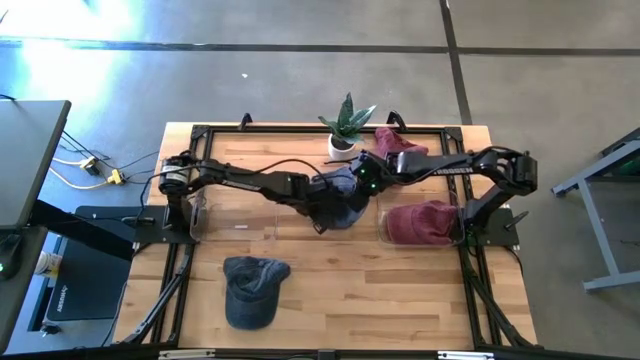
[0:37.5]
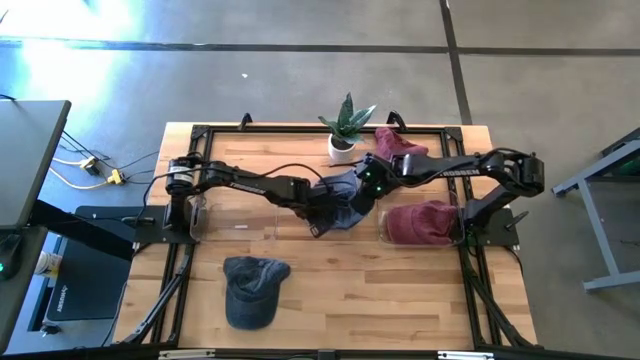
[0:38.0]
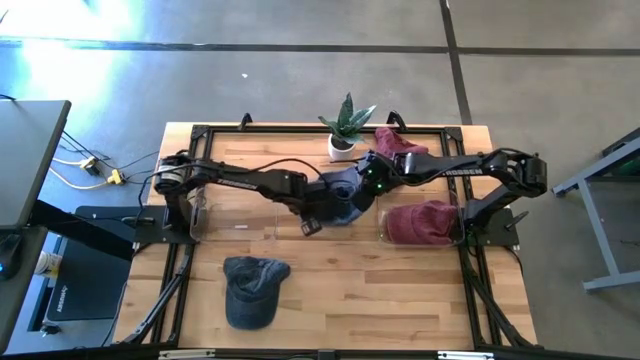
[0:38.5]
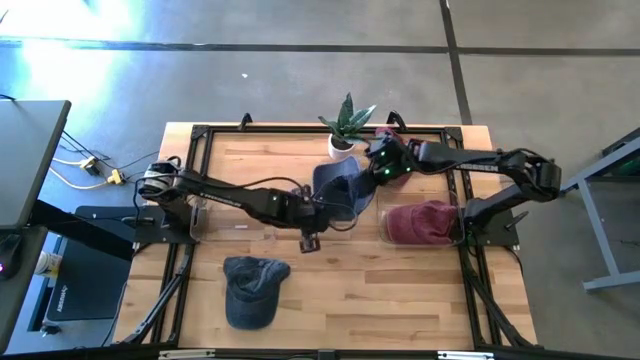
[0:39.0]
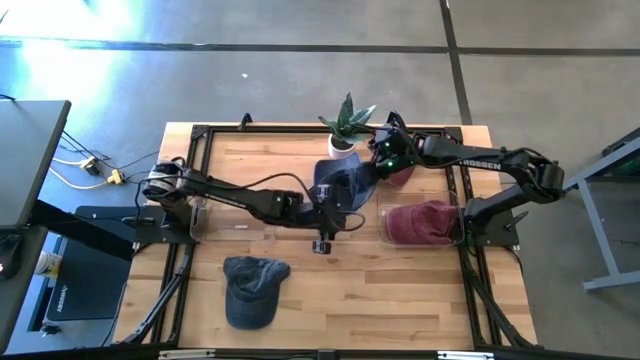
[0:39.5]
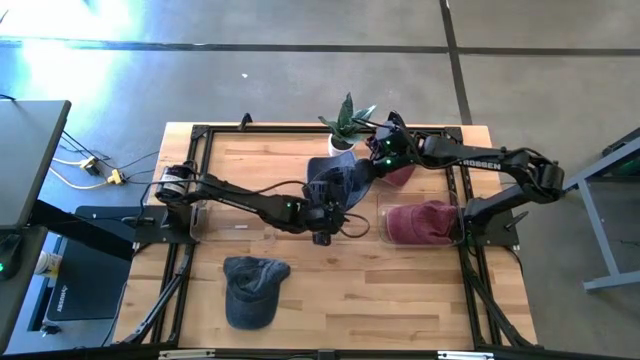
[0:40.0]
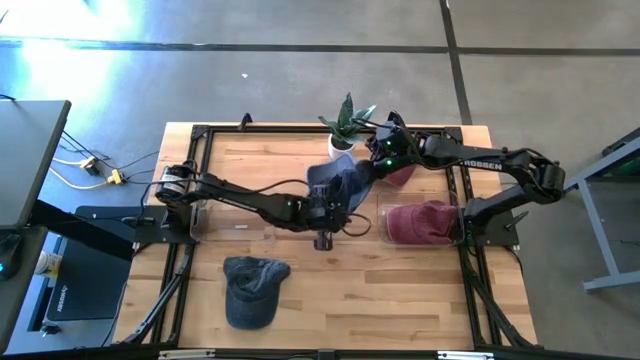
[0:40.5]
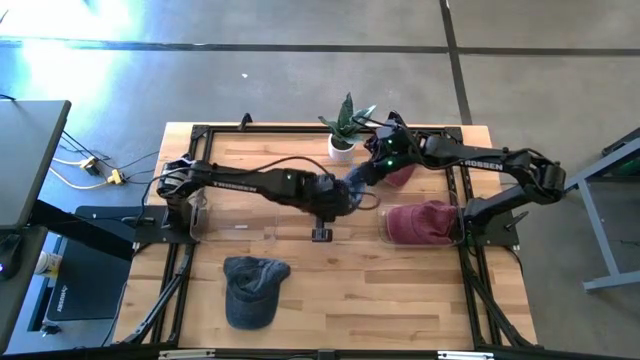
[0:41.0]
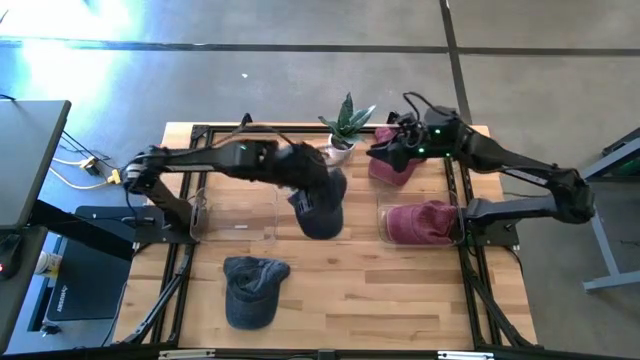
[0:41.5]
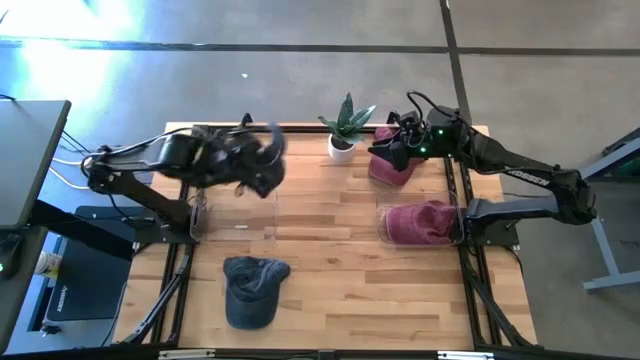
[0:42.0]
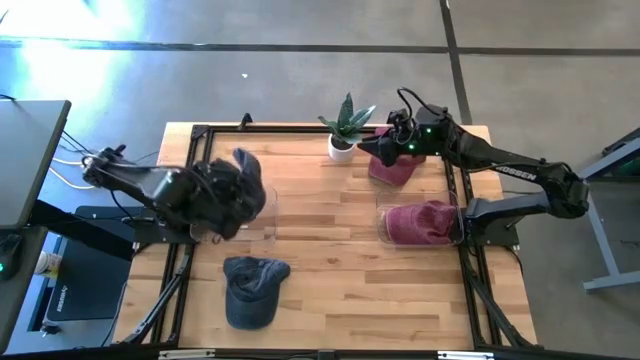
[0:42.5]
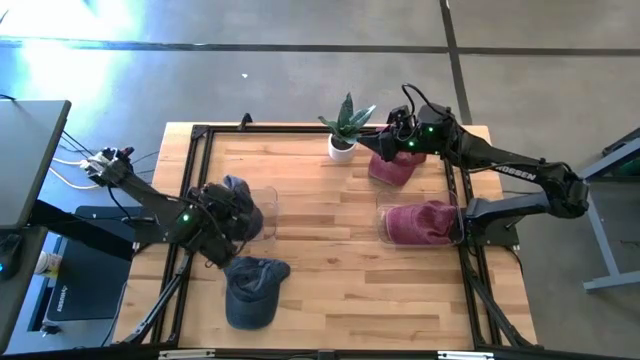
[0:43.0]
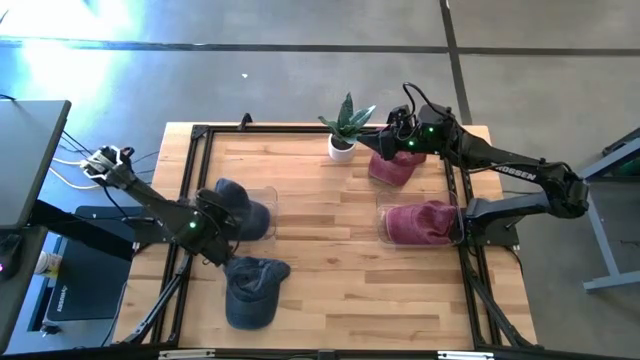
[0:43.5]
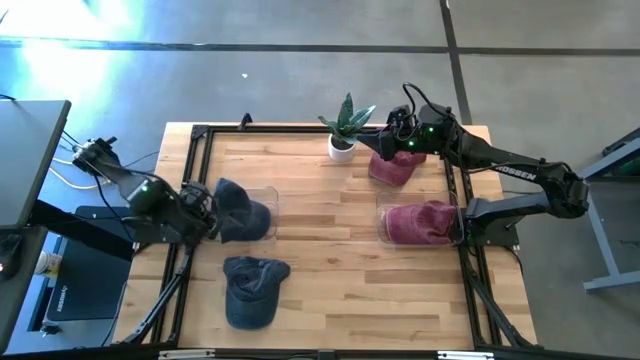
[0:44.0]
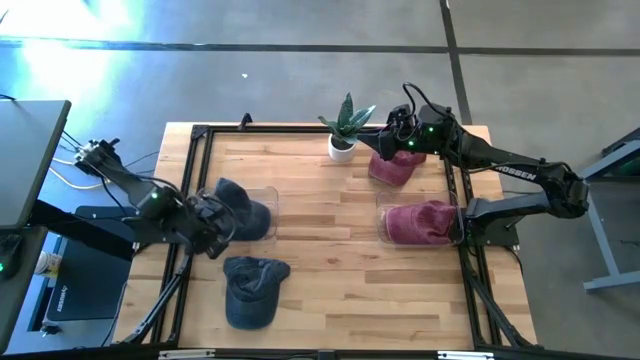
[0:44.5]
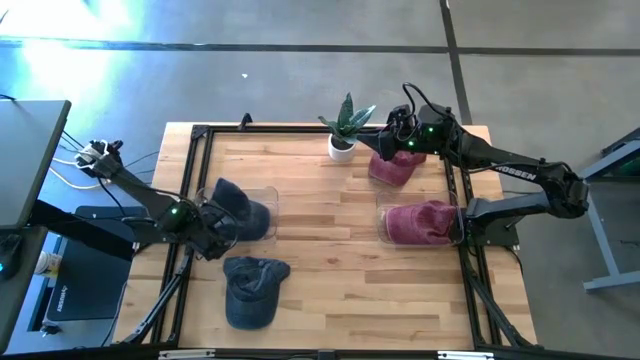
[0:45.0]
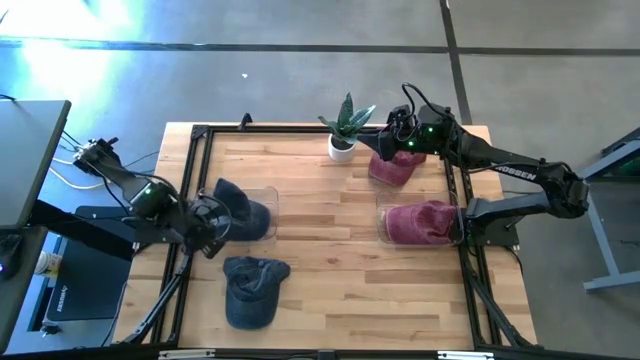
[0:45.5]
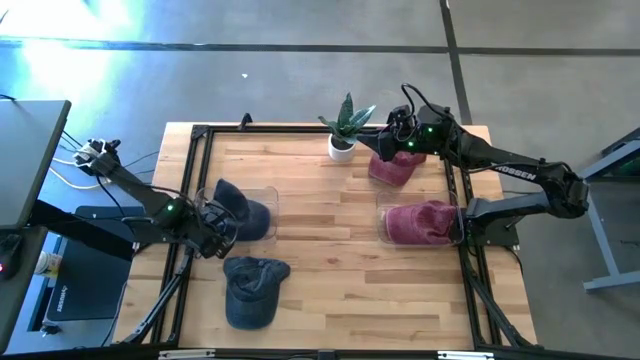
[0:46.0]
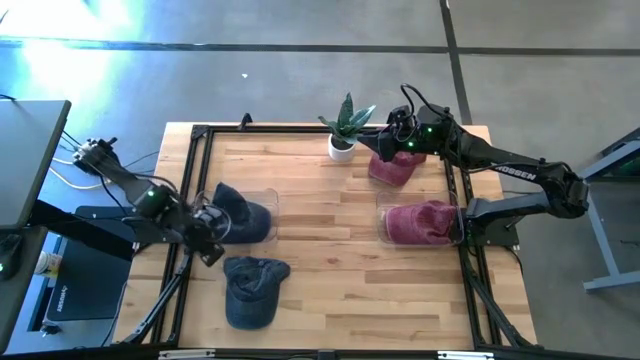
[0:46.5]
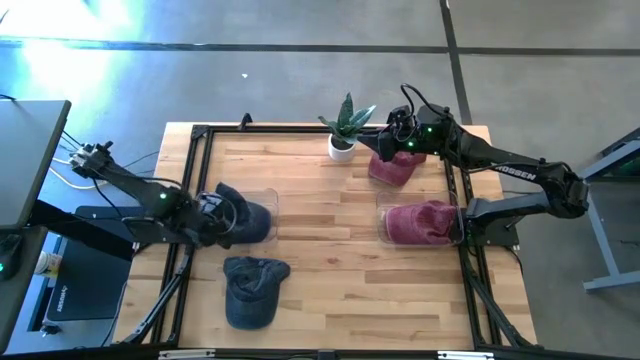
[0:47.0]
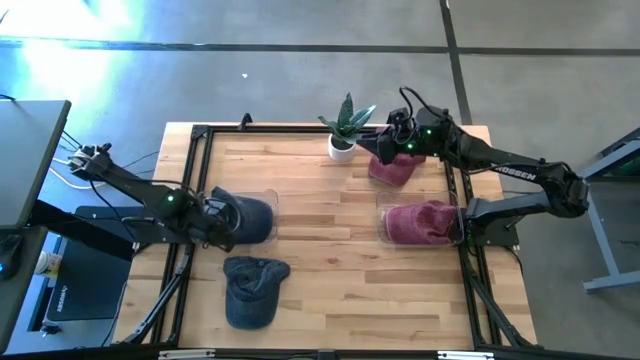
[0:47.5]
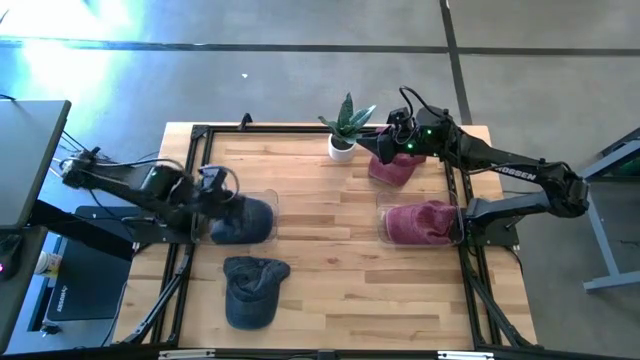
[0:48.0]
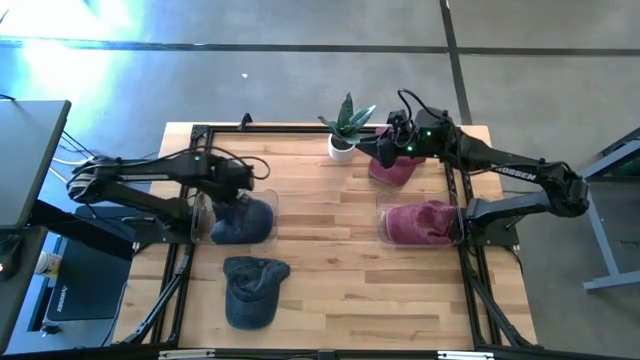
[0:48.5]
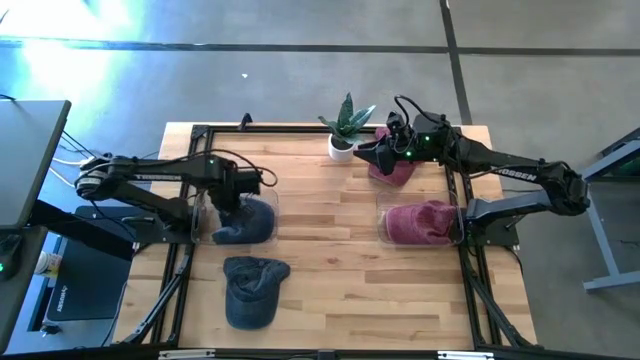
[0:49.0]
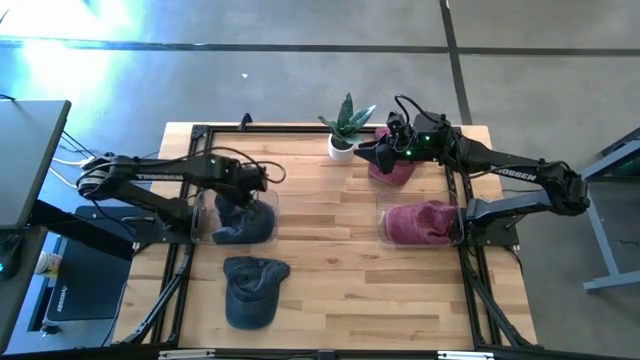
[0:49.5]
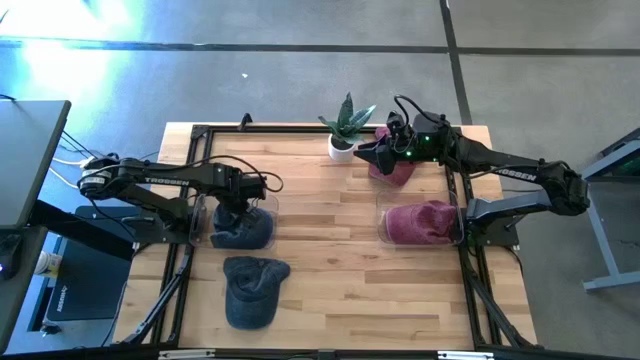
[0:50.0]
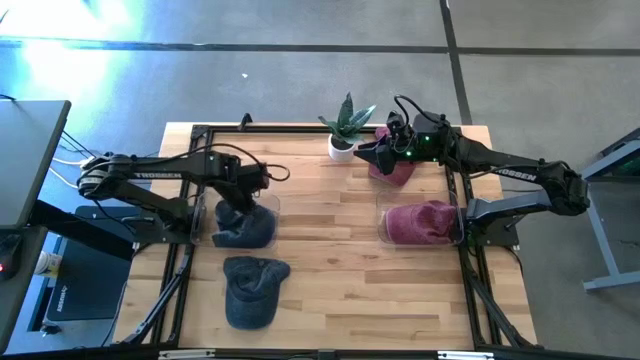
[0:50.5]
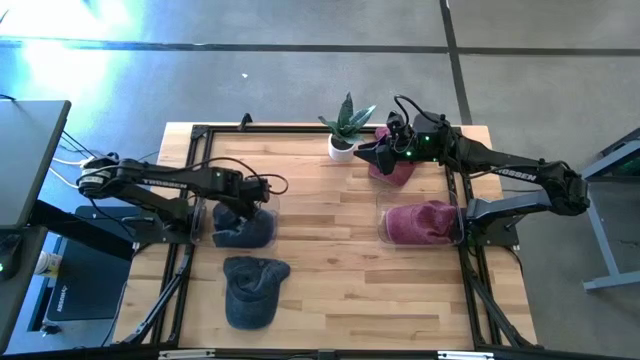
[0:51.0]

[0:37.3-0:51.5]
Task: Pick & Place hat
Put the top blue cap into the left transparent bin

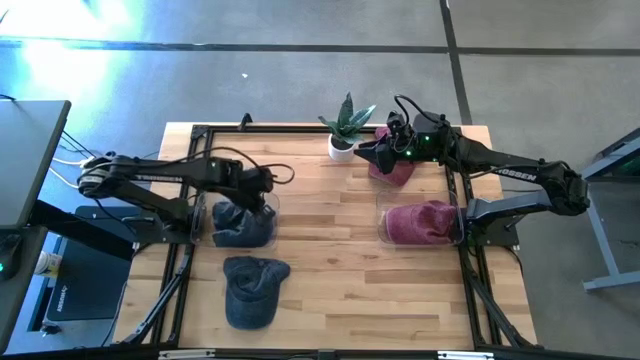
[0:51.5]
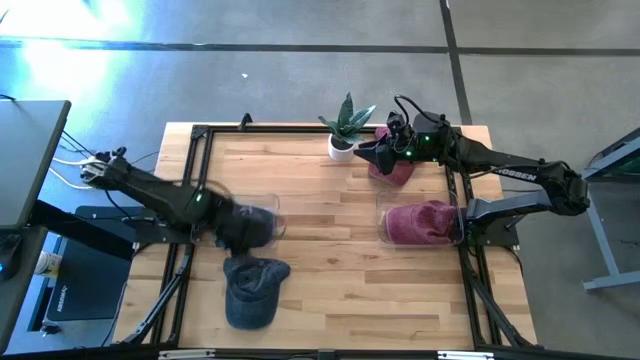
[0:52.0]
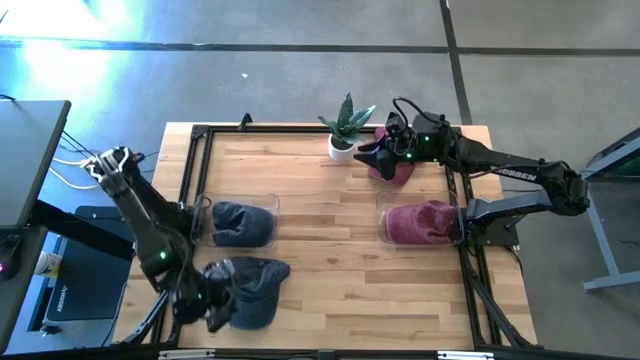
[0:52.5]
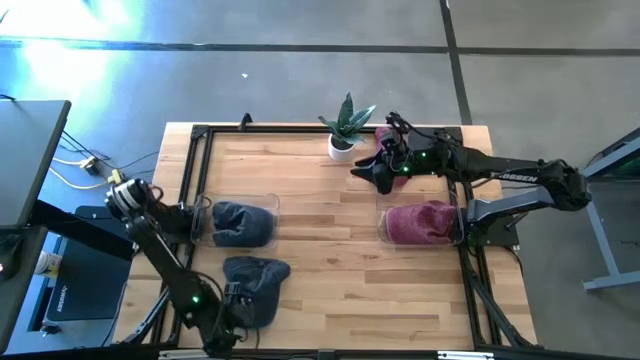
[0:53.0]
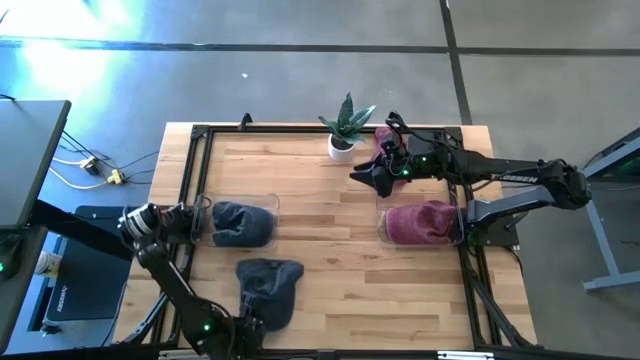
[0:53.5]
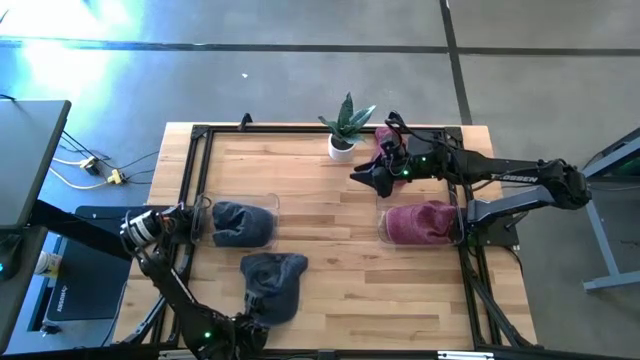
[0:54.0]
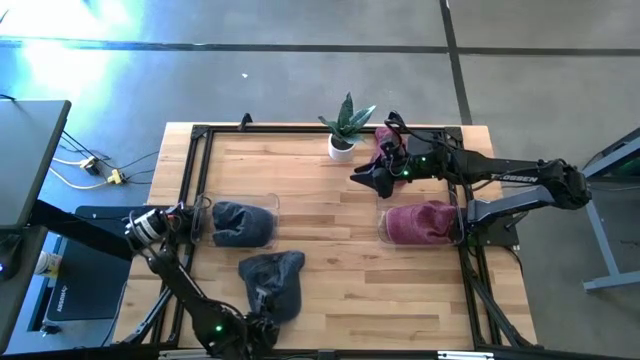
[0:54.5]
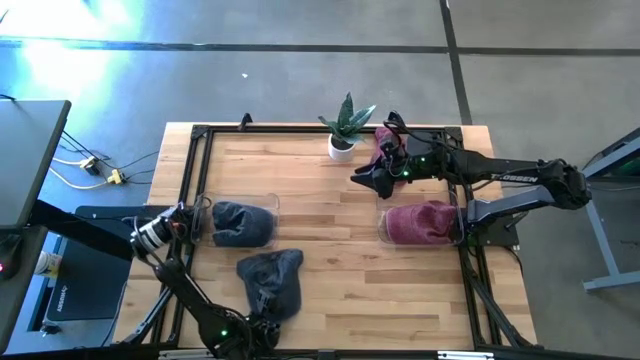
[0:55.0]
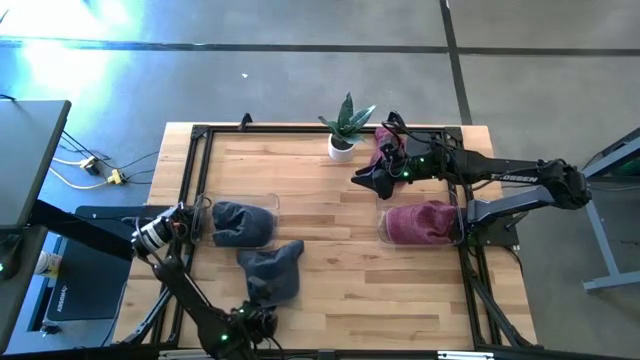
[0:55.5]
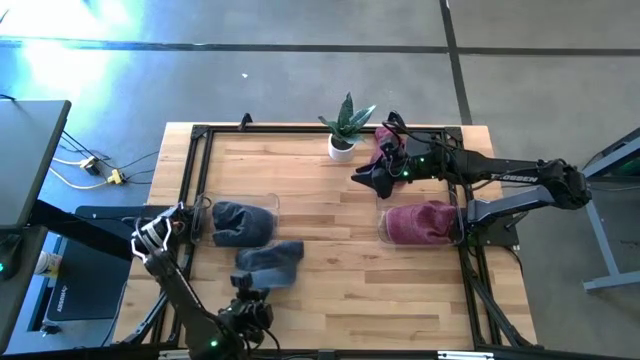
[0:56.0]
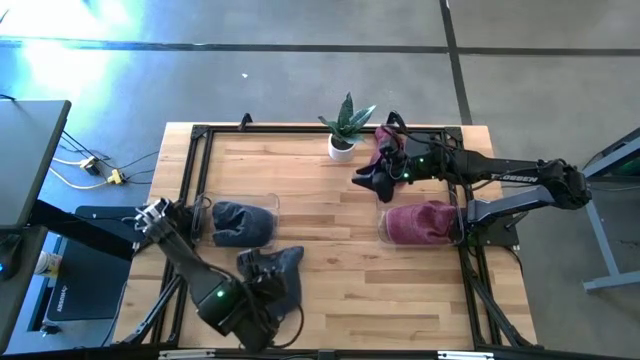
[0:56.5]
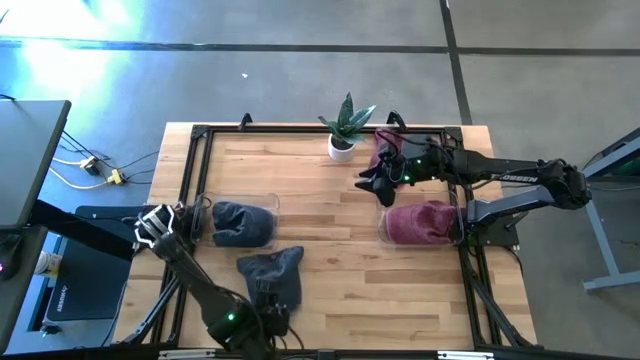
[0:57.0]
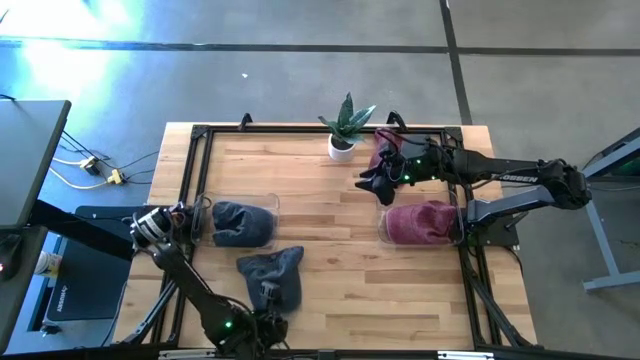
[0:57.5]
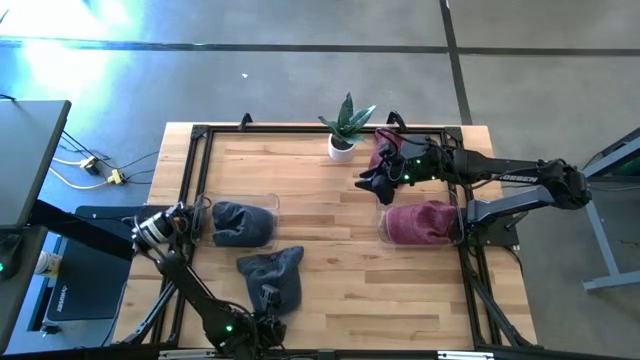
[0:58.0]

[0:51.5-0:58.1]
Put the blue cap into the left transparent bin
